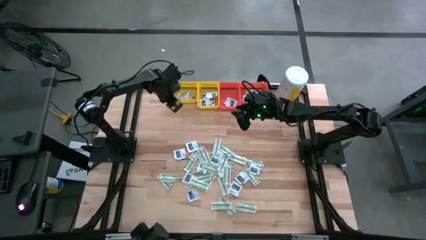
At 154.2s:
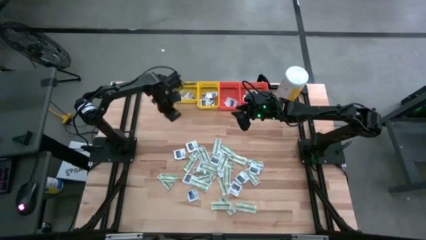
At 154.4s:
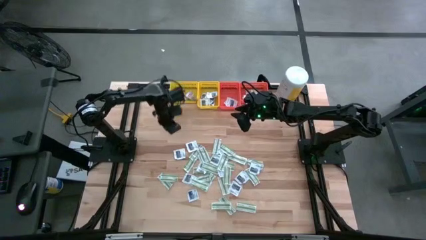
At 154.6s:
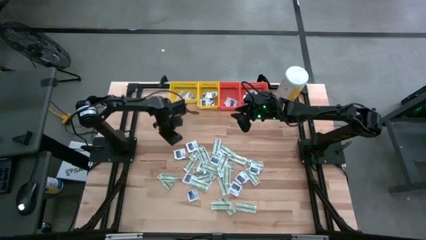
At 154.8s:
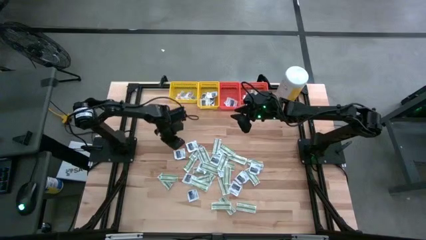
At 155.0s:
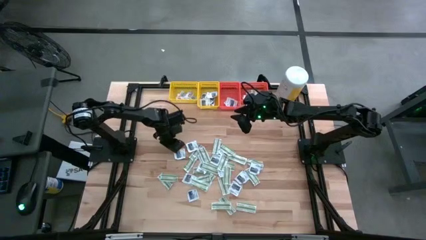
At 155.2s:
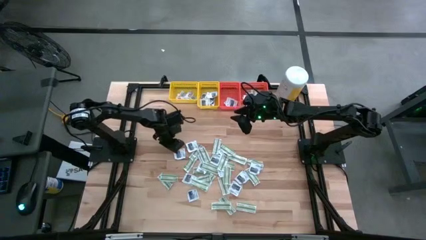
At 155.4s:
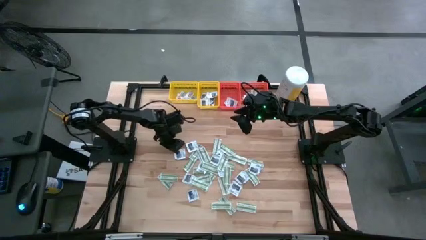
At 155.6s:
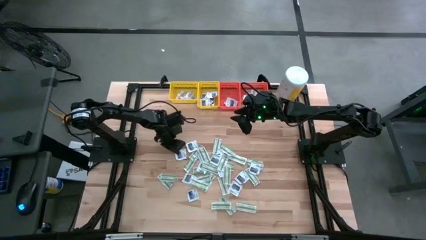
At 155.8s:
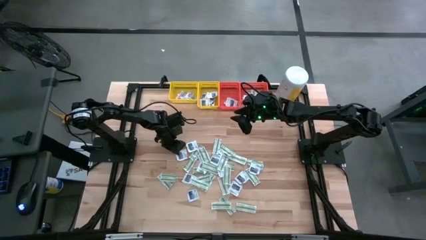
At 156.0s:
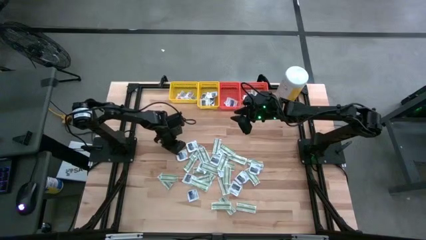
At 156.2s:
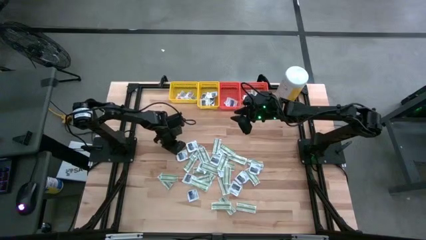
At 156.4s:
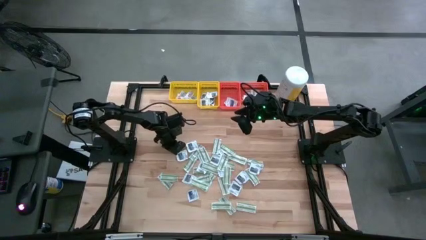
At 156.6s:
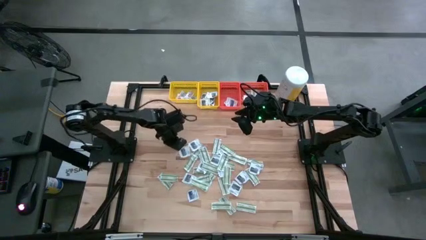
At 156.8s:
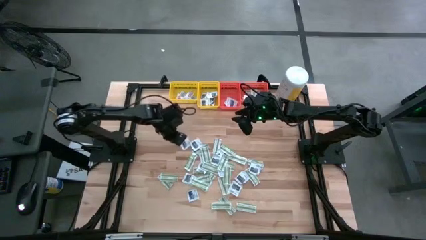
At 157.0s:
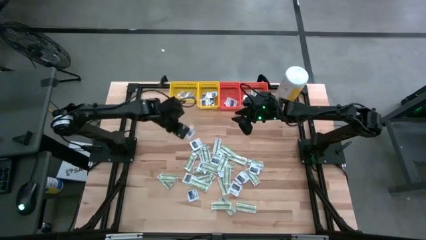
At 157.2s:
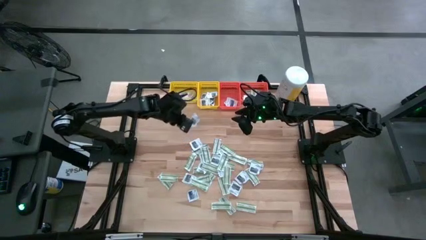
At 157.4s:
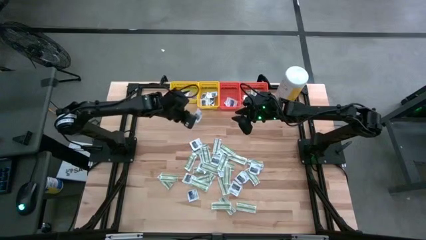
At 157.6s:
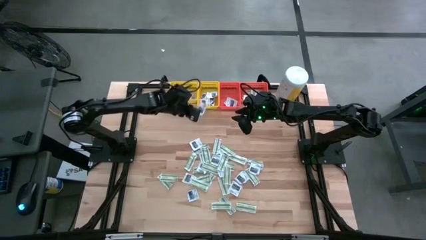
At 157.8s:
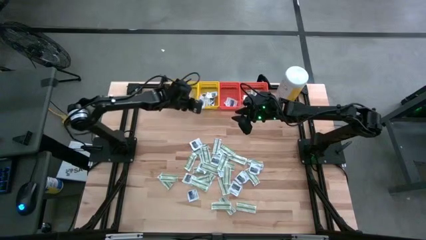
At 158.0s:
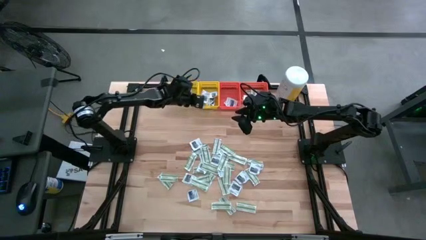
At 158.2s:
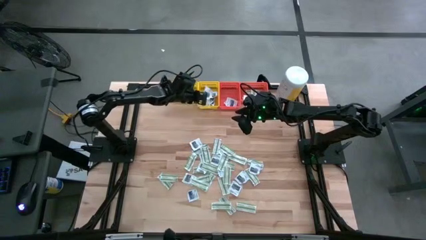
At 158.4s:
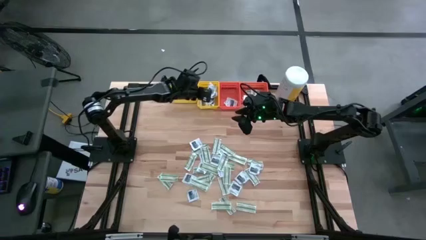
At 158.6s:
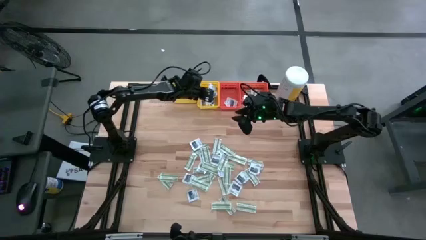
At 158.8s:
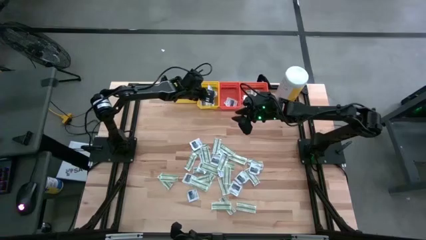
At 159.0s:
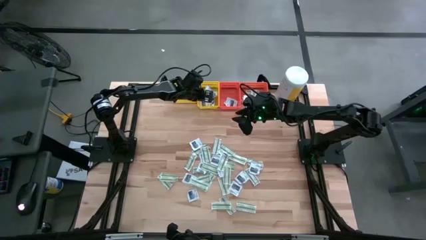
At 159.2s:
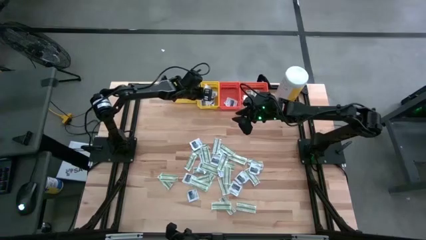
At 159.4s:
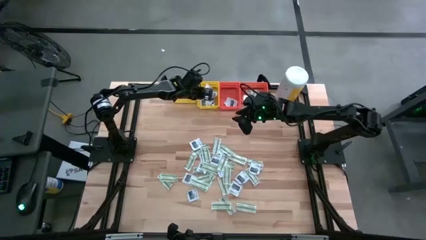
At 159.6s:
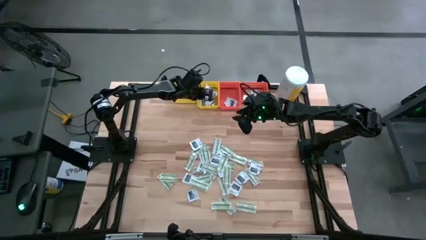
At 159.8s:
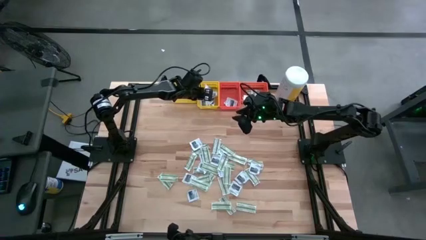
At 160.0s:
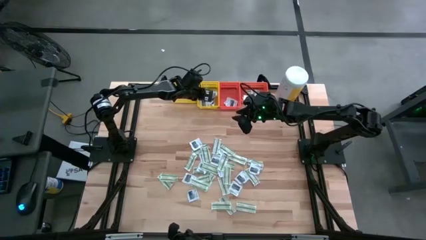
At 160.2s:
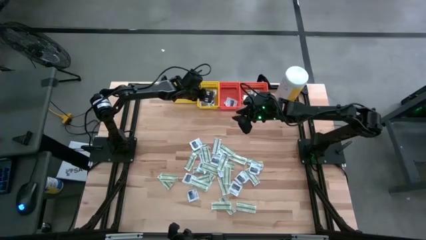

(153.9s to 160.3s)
Task: Pick & Place First Aid Supplies
Put the gray packet into the middle yellow bin

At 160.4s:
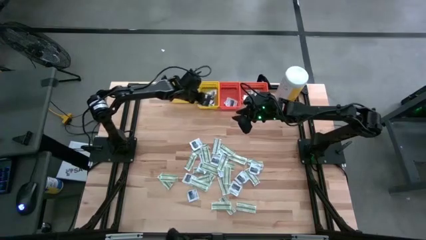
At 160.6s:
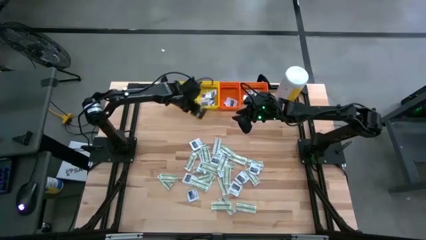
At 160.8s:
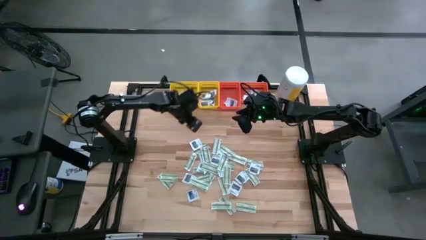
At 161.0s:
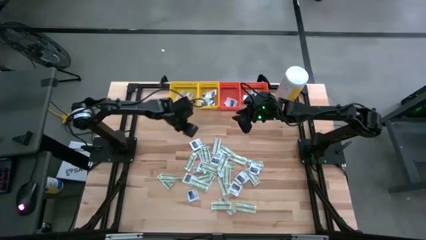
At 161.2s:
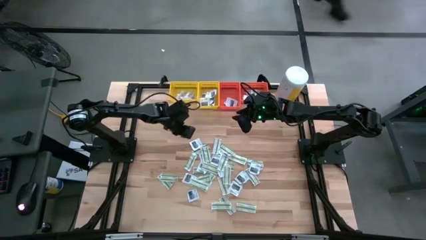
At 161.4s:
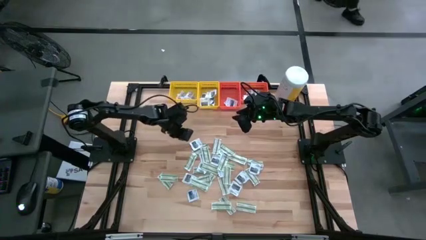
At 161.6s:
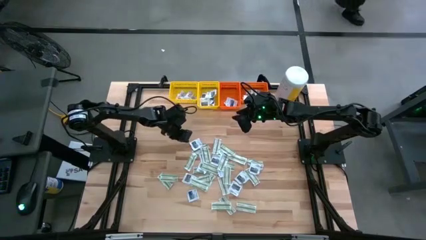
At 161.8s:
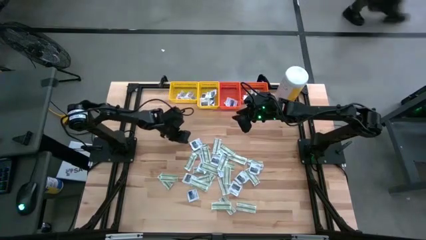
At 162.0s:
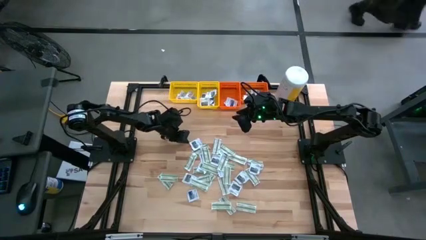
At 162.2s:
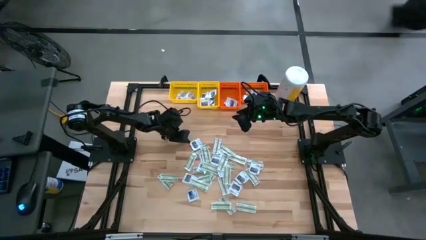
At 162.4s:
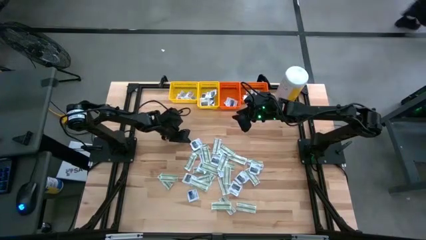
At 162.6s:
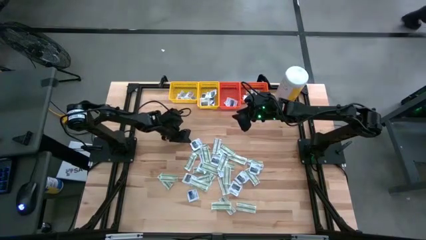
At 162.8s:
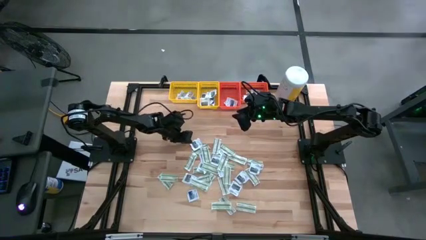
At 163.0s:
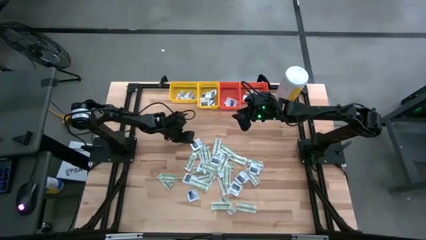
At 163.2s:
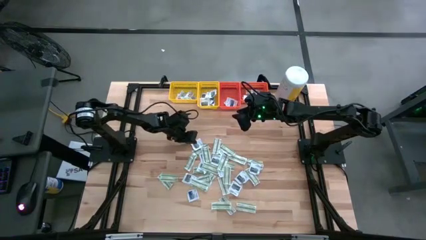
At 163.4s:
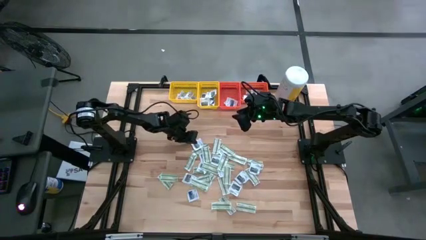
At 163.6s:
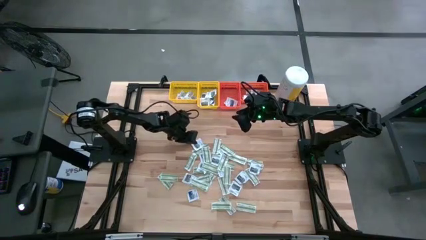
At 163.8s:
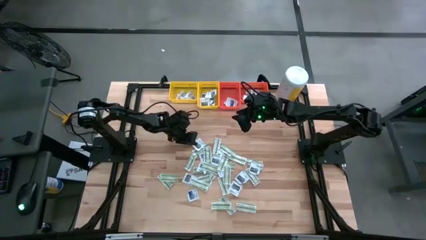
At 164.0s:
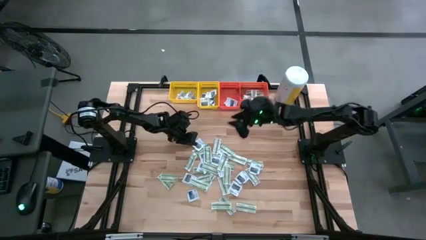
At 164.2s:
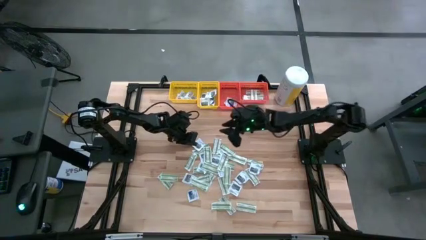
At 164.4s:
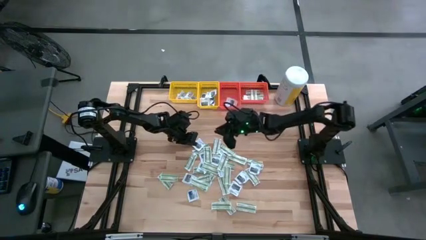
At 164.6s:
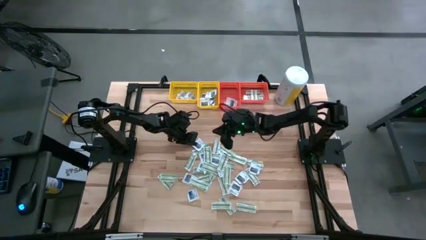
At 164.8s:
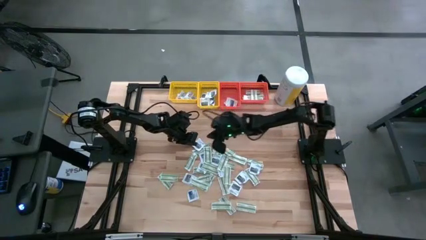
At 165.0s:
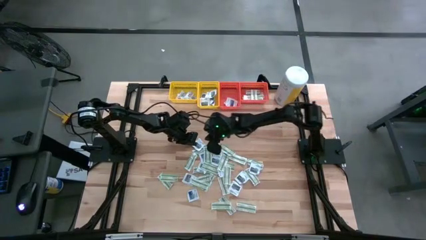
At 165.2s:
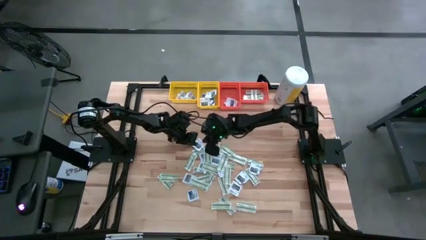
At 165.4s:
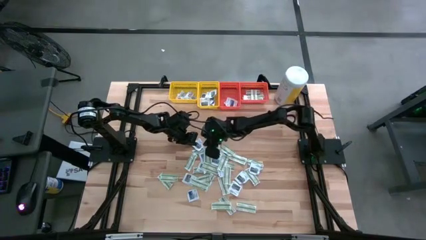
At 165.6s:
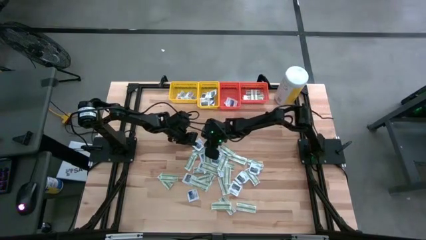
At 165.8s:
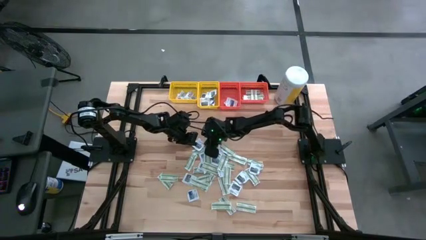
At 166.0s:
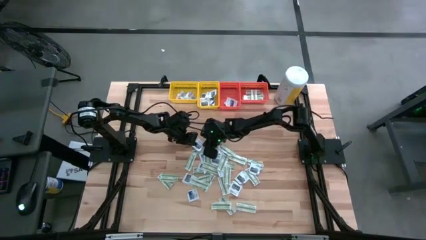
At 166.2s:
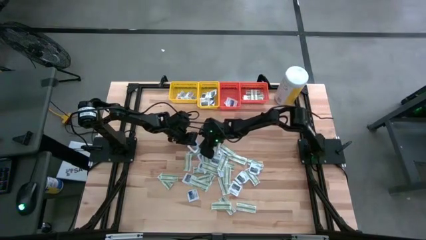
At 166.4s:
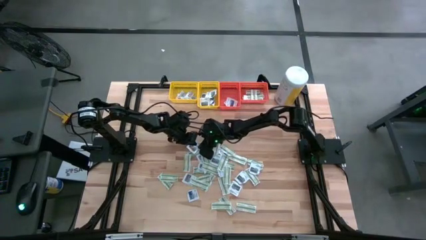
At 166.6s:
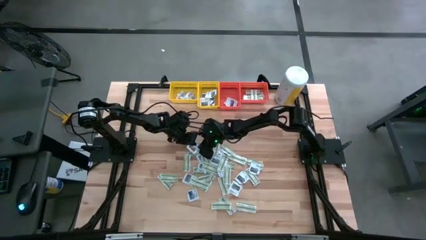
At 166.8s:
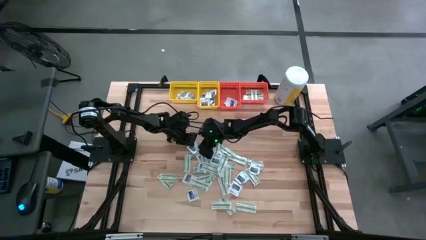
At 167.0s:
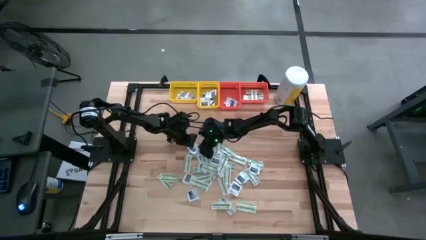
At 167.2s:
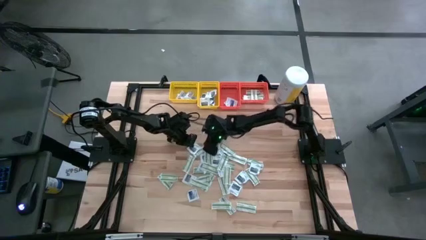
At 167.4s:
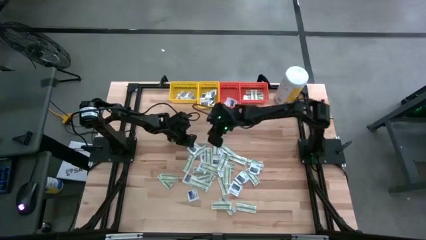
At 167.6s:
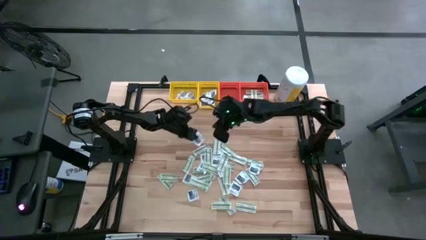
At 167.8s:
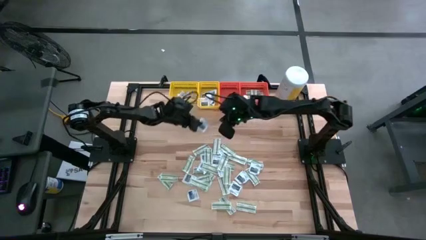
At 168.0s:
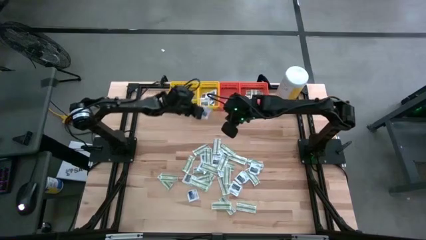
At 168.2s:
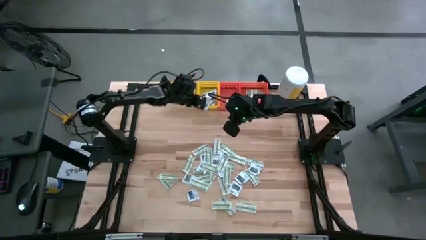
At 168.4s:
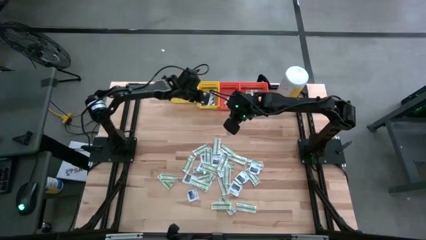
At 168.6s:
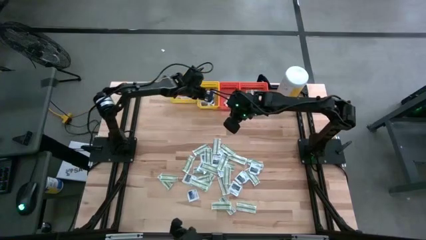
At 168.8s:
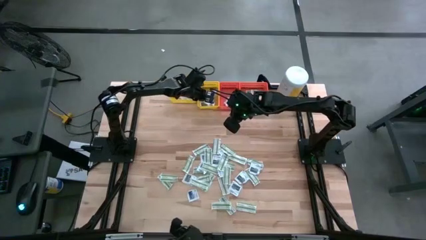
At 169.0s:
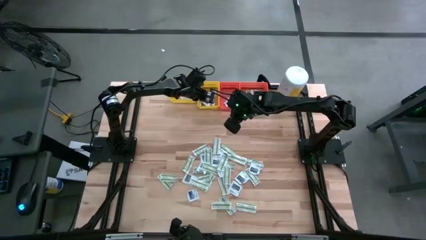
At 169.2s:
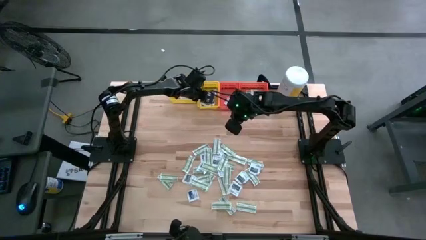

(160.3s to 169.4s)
Put the gray packet into the right yellow bin

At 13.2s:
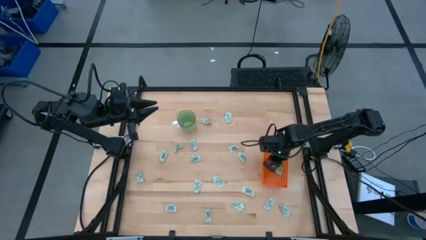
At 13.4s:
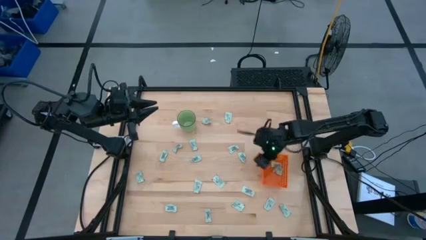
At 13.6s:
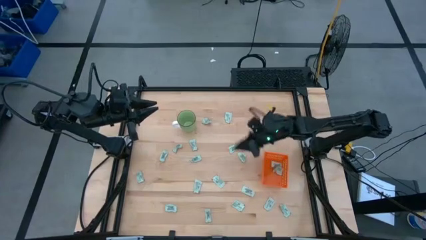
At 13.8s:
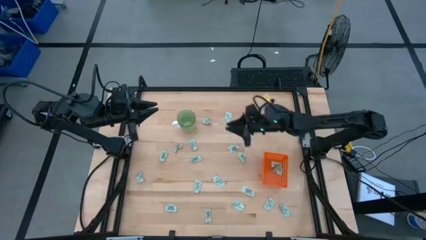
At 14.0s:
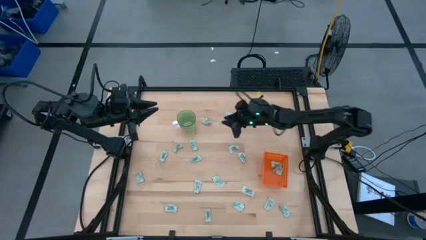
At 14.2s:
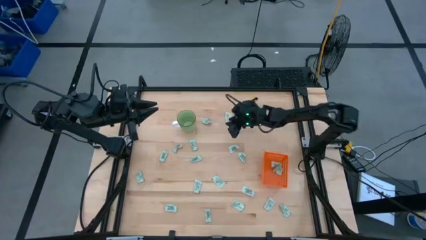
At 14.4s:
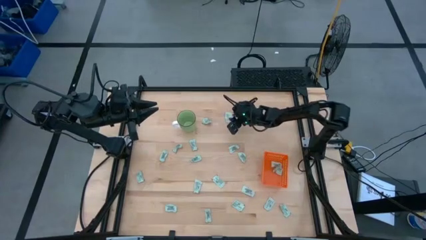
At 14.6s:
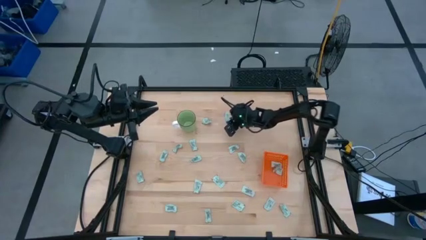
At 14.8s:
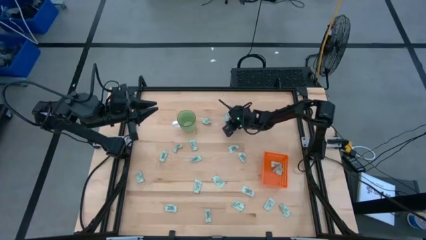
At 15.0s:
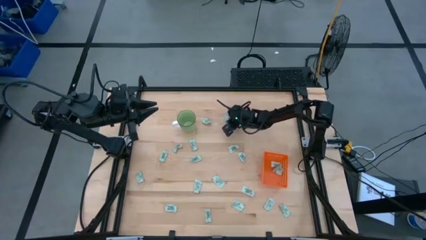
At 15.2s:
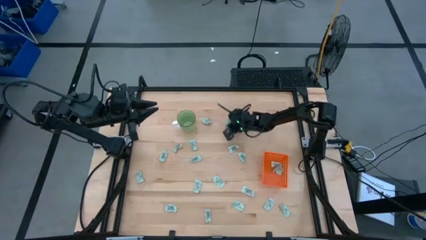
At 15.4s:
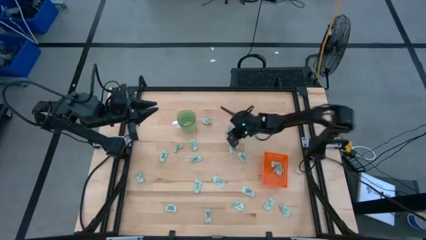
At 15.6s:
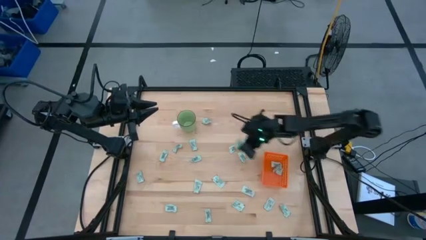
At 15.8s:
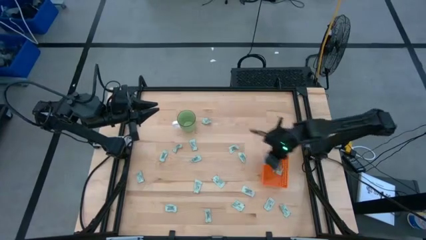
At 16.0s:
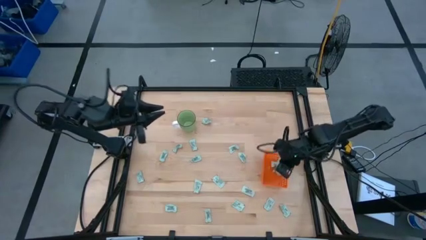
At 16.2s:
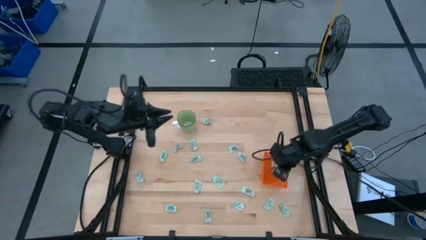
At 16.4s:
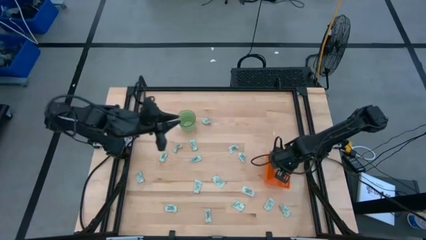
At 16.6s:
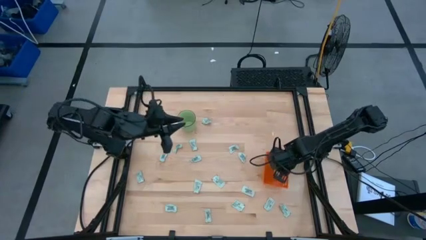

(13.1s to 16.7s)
Task: Pick and place Stevia / Truvia into bins
Put the stevia packet into the orange basket
